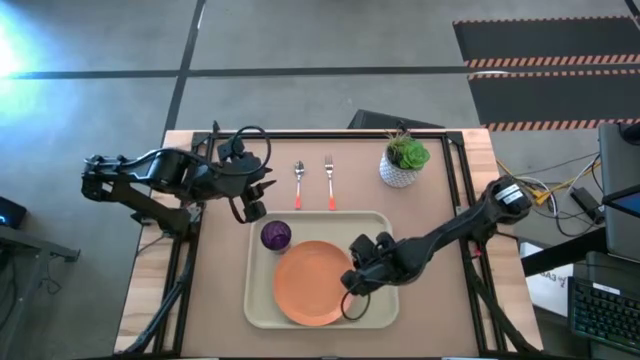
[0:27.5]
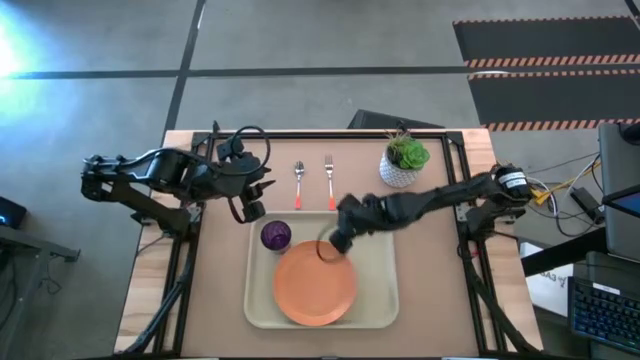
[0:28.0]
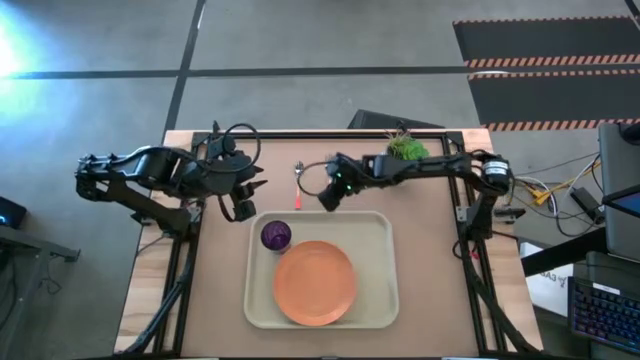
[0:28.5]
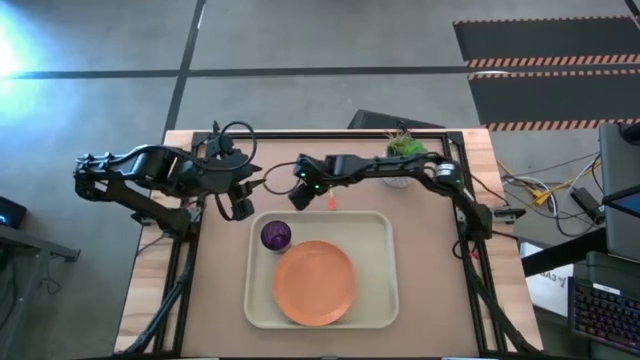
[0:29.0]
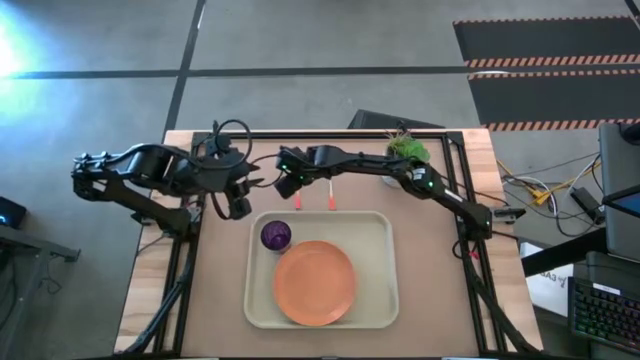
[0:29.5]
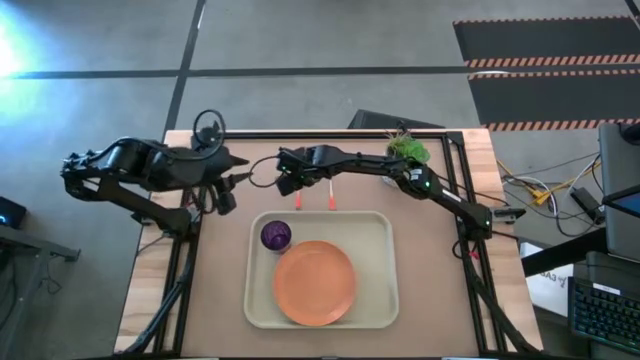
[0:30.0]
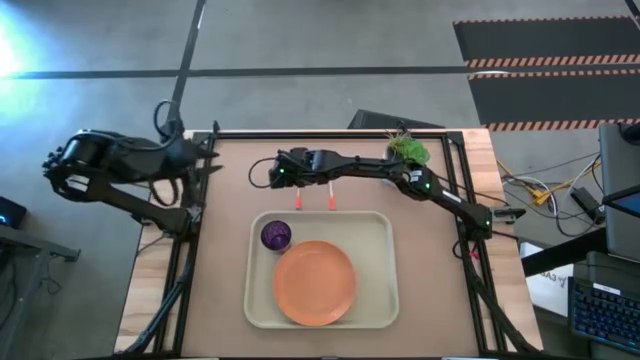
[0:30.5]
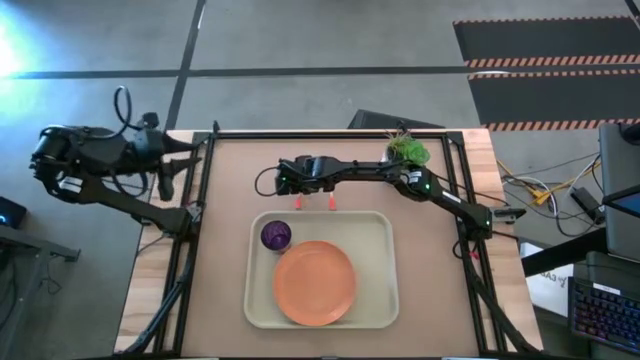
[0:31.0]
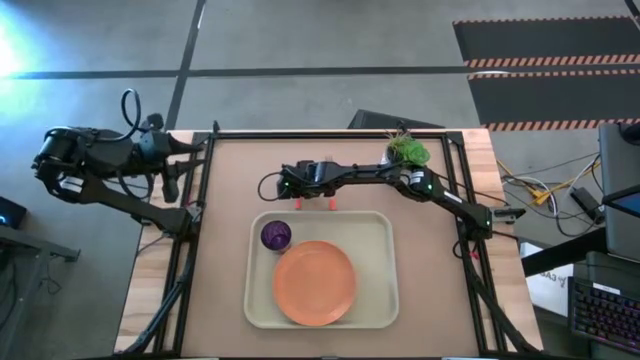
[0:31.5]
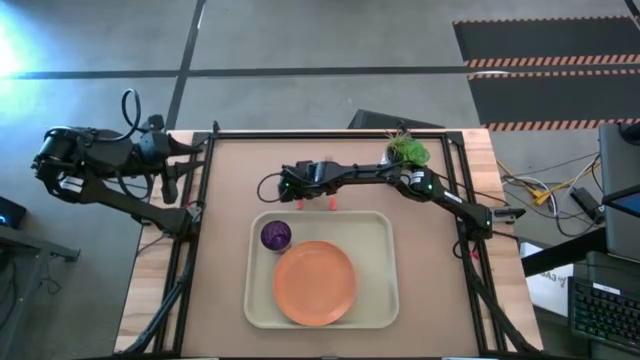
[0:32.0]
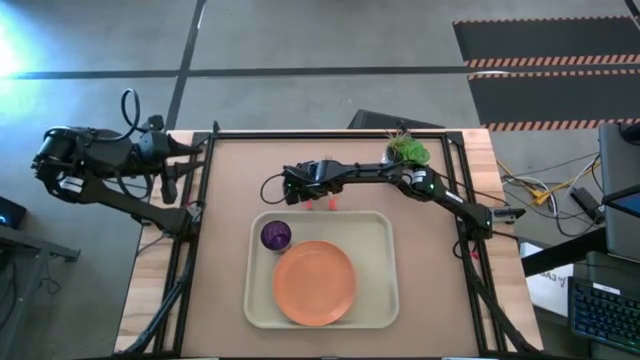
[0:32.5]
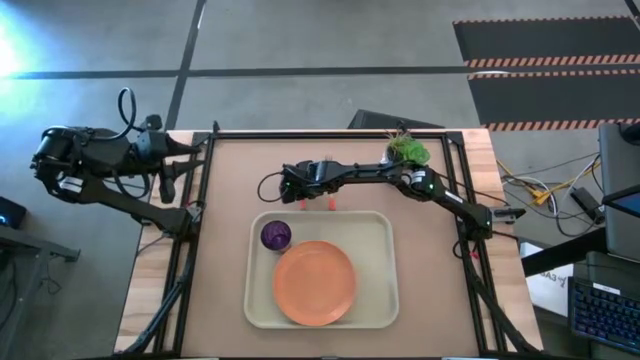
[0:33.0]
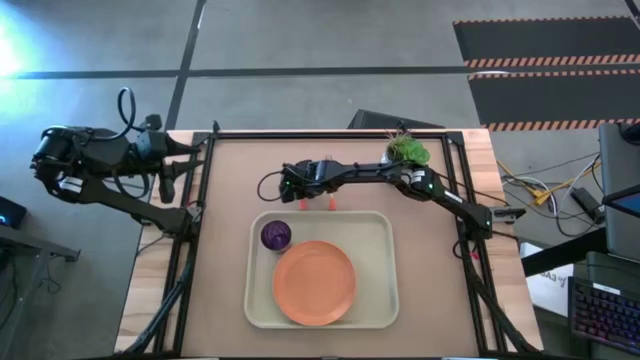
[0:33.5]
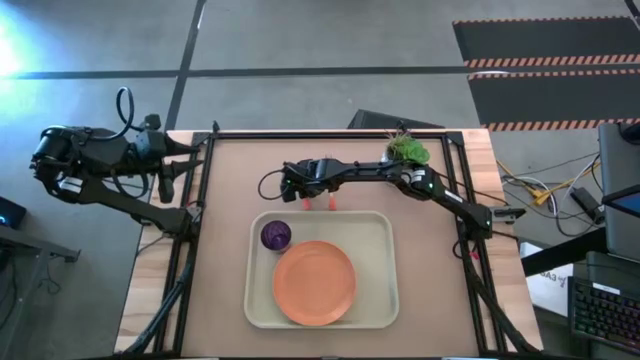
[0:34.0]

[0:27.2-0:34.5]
Task: Pick and place plate/cup/fork/spoon on tray
Put the orange spoon on the white tray to the right of the orange plate

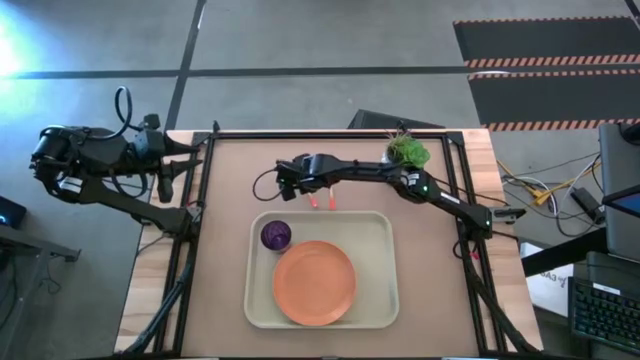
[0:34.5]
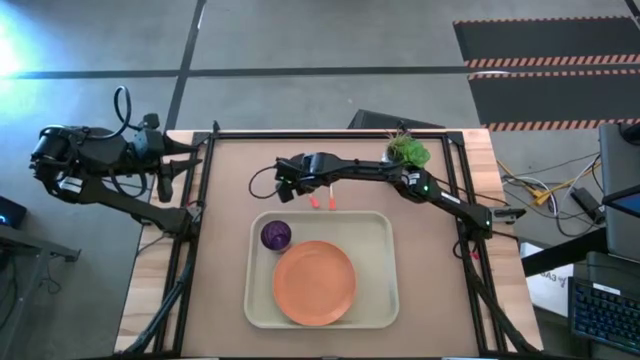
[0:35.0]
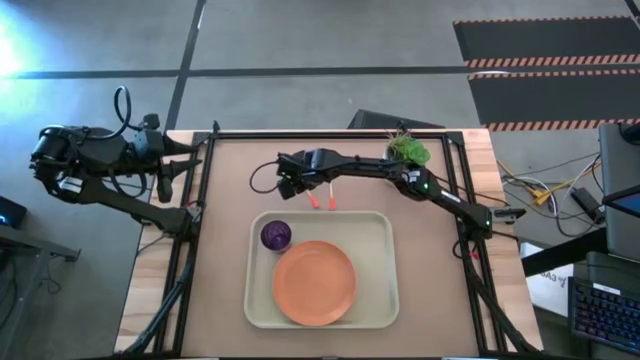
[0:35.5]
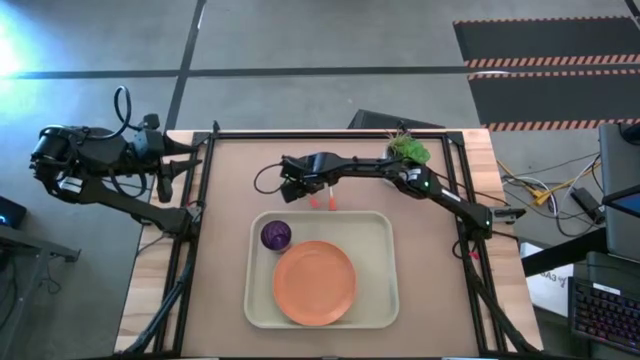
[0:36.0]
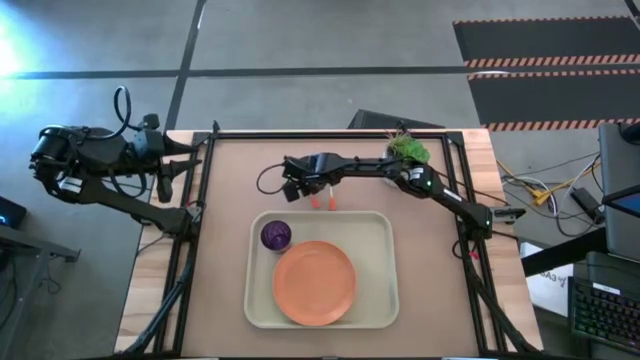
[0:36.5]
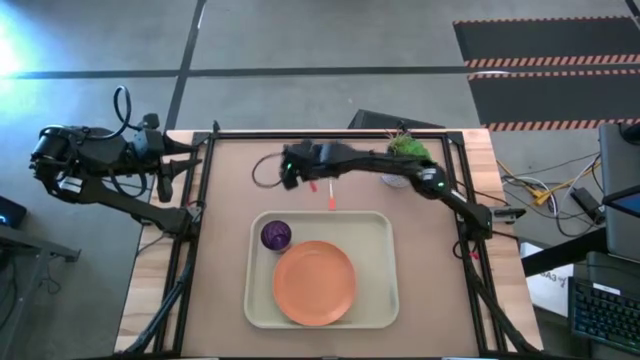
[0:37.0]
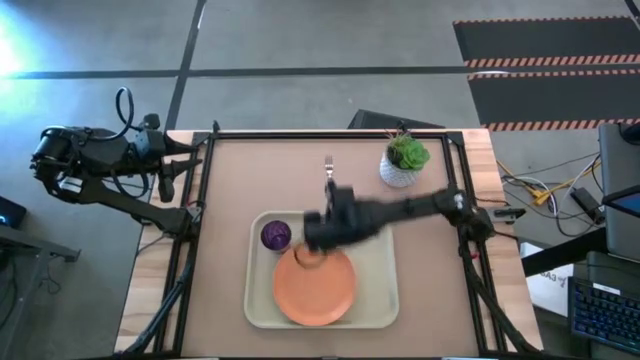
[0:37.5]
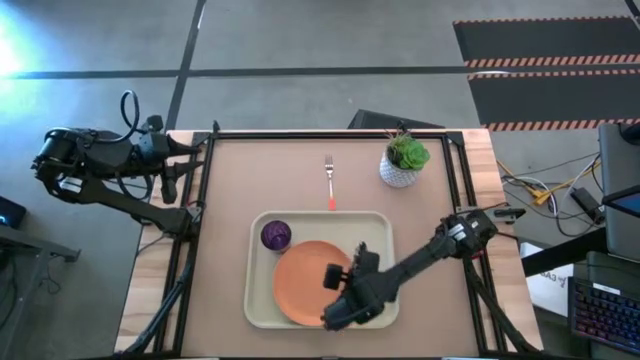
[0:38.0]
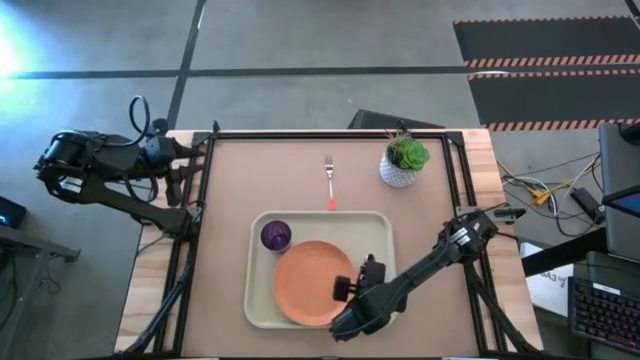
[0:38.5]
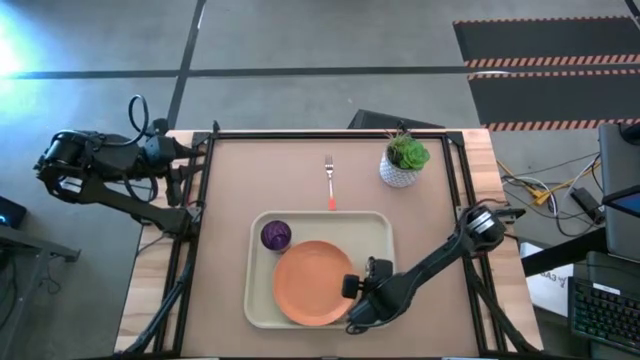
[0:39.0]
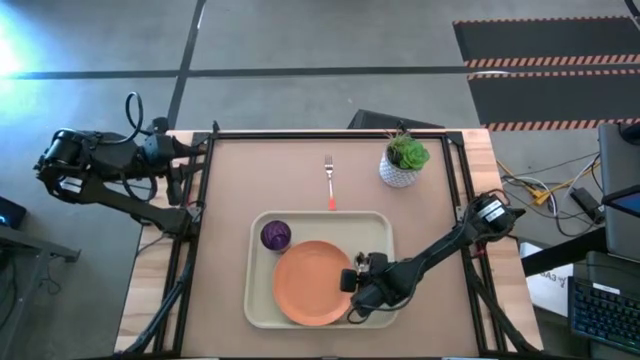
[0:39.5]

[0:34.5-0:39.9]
Put the orange spoon on the white tray to the right of the orange plate

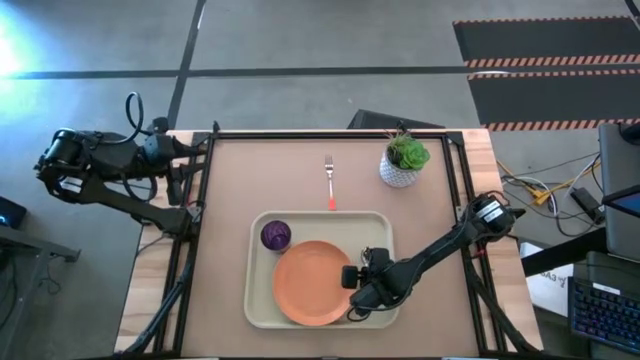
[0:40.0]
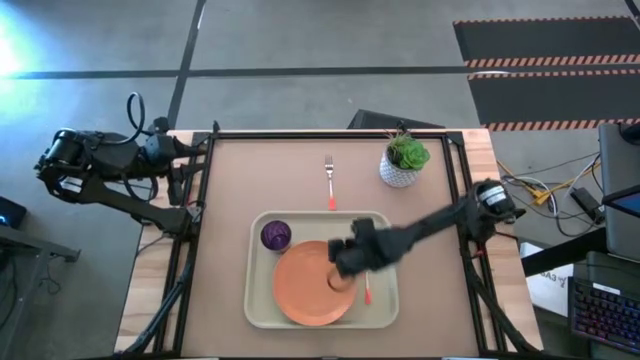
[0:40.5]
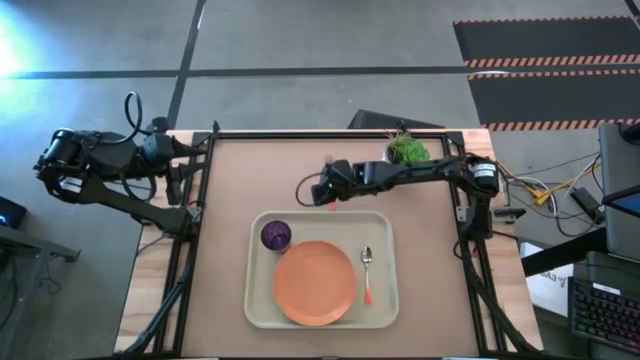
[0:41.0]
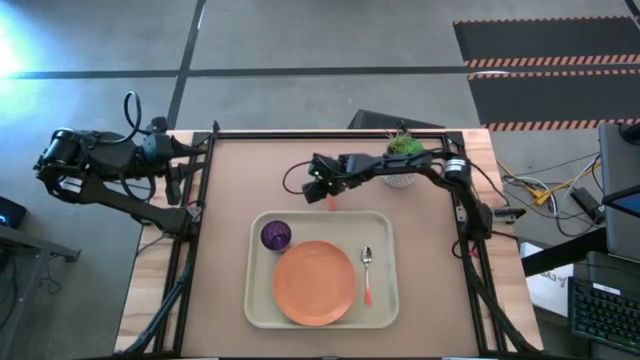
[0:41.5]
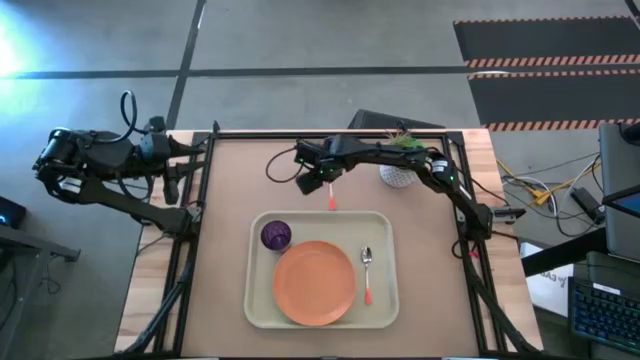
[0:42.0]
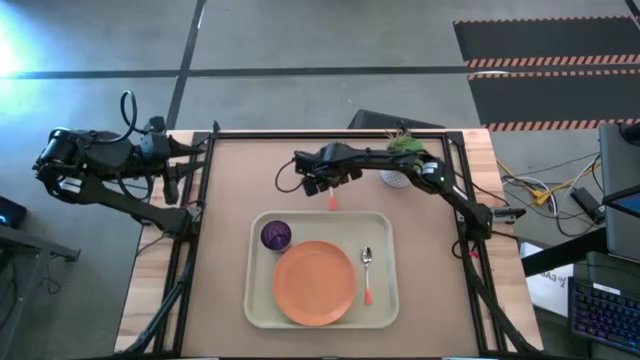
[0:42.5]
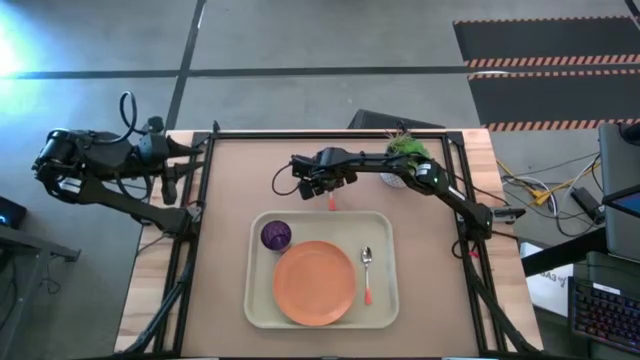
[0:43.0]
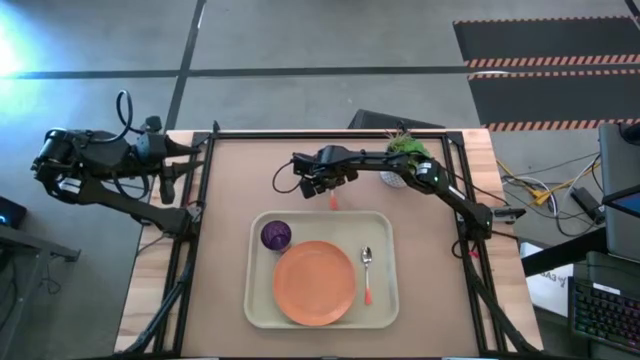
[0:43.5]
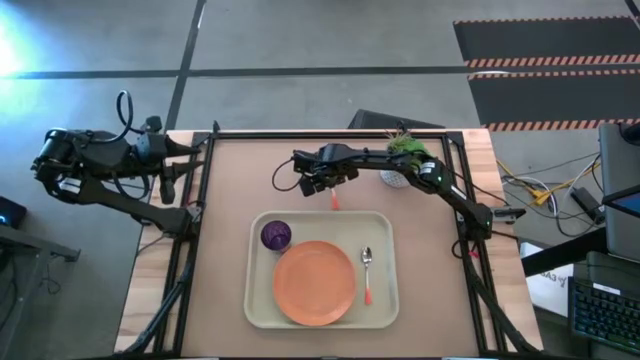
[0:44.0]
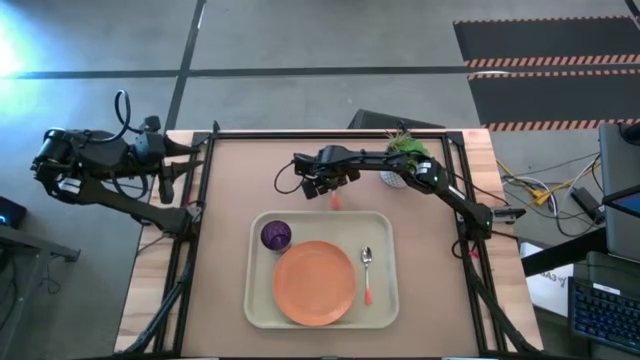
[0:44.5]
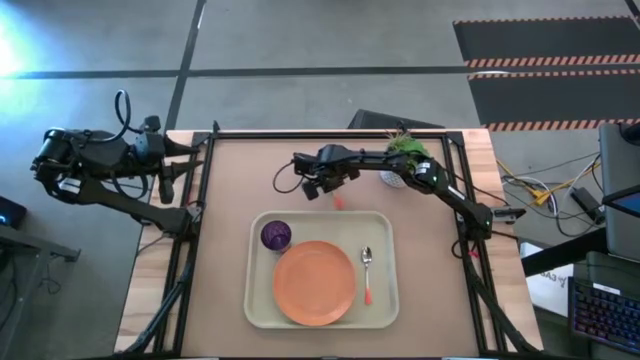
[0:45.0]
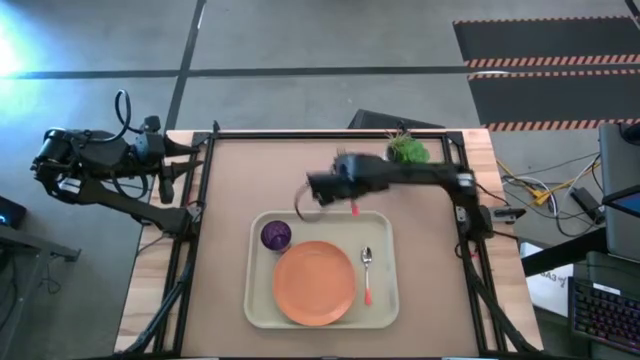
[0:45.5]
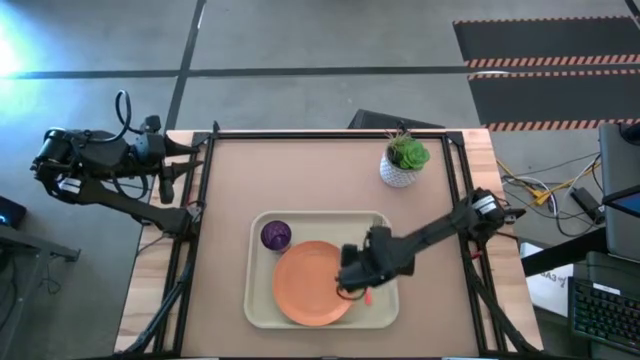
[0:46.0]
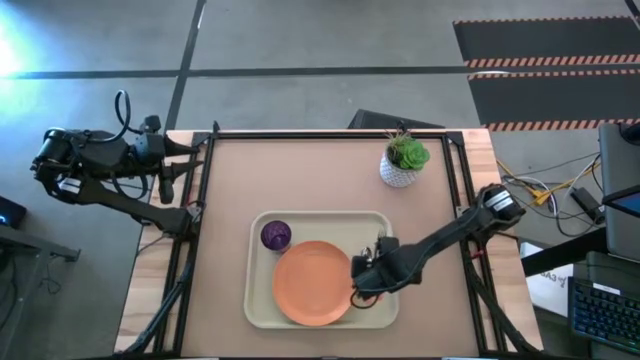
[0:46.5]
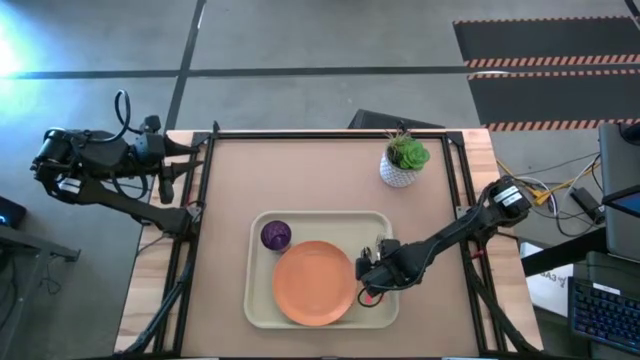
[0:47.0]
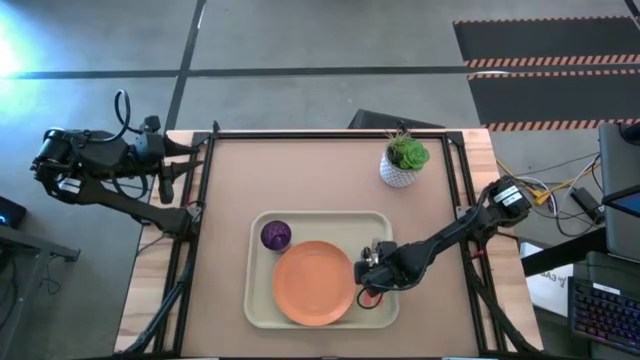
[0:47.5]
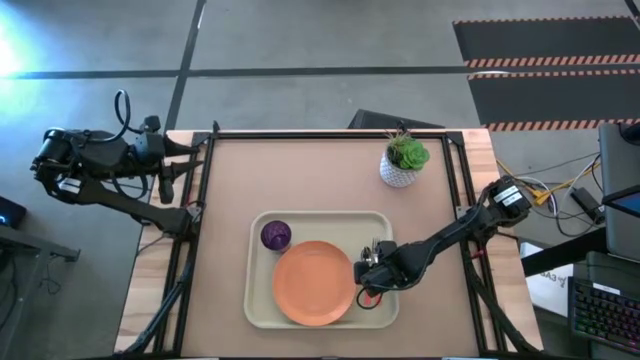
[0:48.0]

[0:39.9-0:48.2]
Put the orange fork on the white tray to the right of the orange spoon
